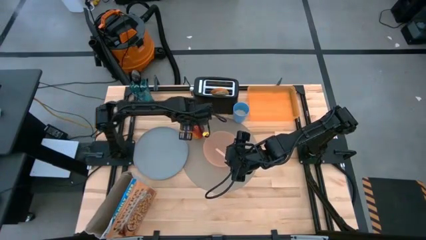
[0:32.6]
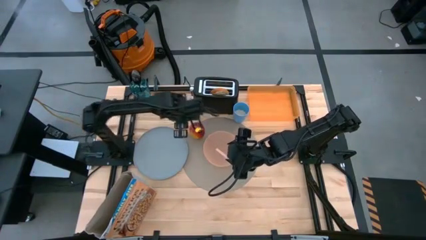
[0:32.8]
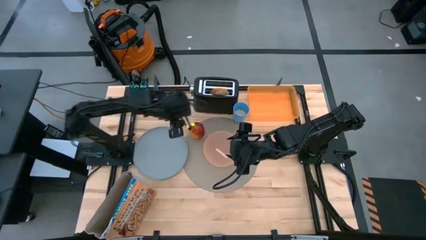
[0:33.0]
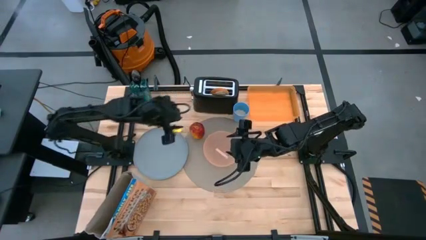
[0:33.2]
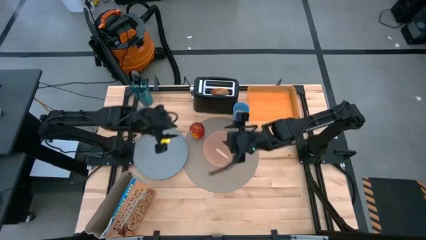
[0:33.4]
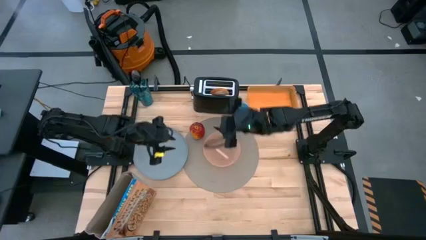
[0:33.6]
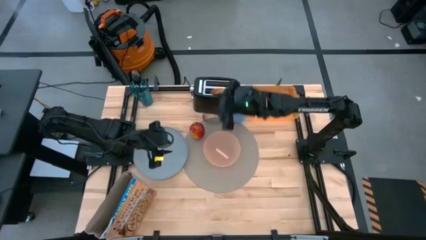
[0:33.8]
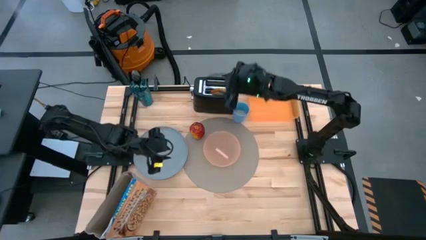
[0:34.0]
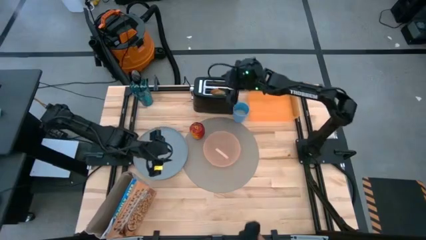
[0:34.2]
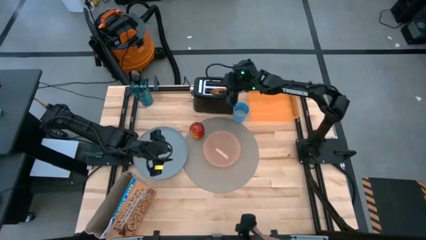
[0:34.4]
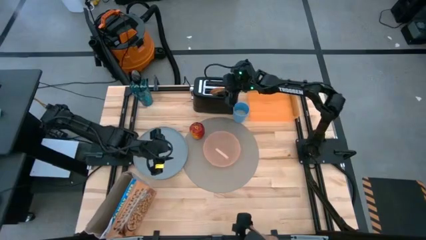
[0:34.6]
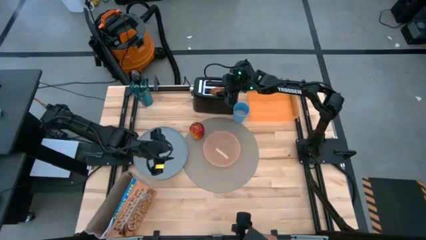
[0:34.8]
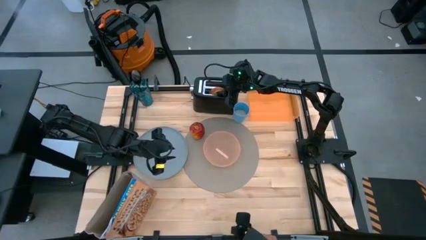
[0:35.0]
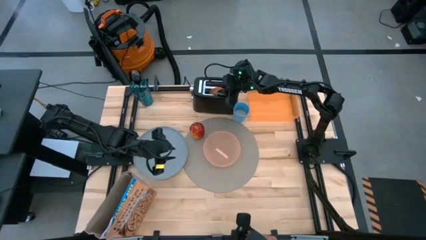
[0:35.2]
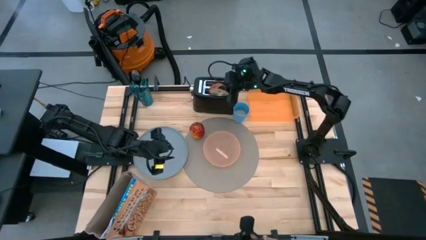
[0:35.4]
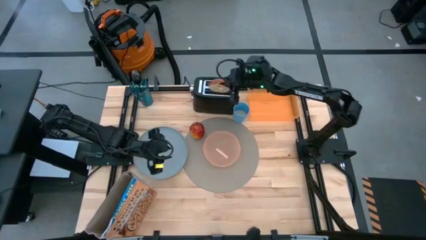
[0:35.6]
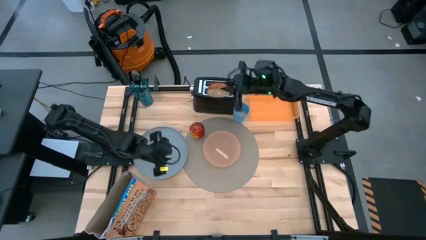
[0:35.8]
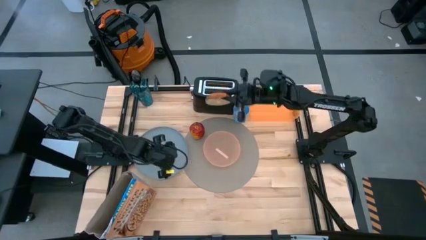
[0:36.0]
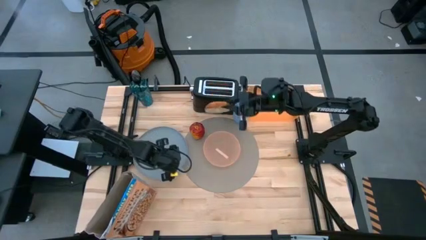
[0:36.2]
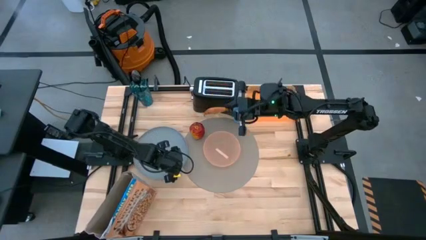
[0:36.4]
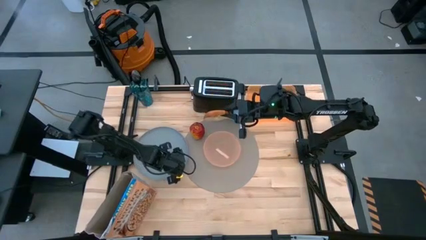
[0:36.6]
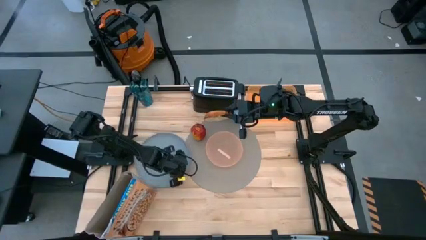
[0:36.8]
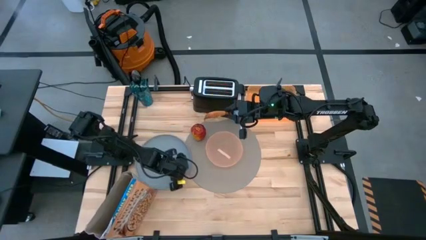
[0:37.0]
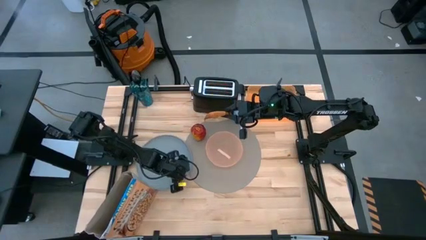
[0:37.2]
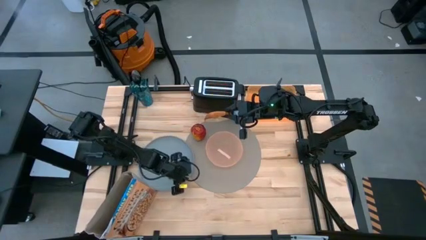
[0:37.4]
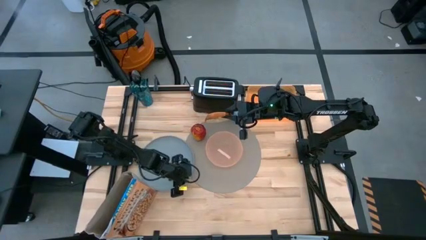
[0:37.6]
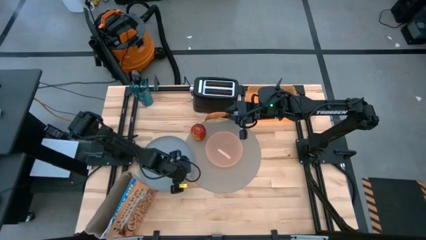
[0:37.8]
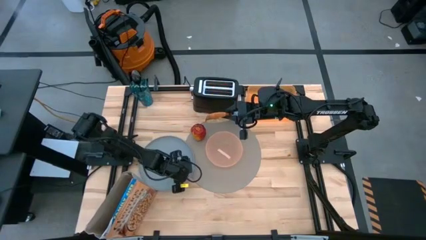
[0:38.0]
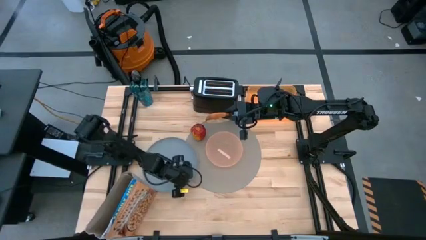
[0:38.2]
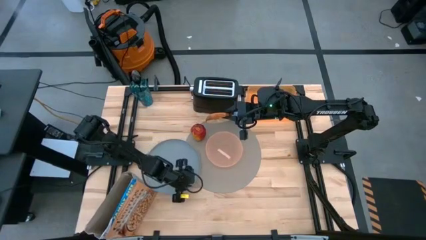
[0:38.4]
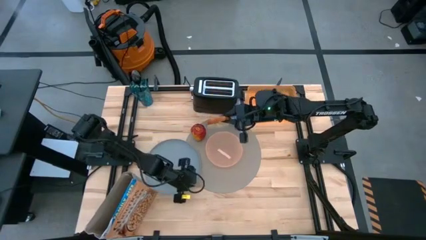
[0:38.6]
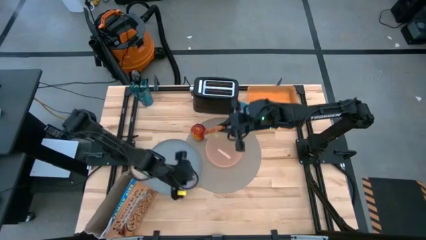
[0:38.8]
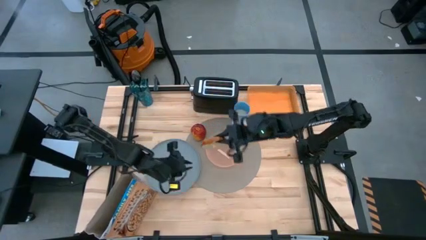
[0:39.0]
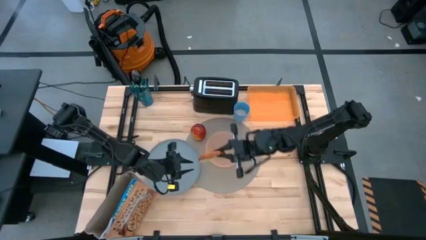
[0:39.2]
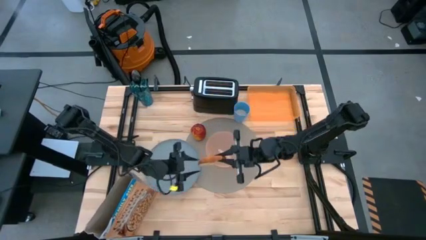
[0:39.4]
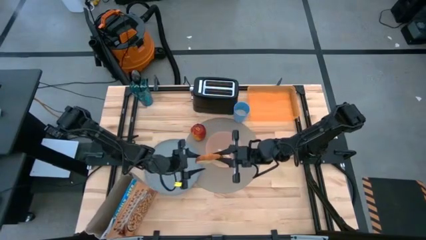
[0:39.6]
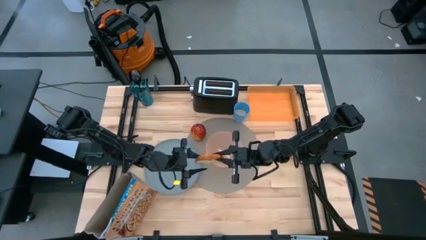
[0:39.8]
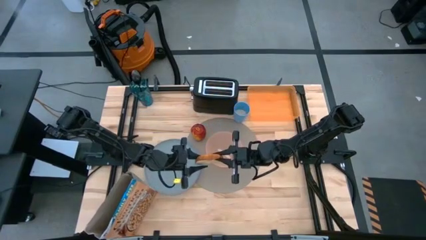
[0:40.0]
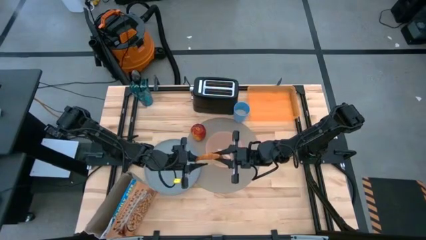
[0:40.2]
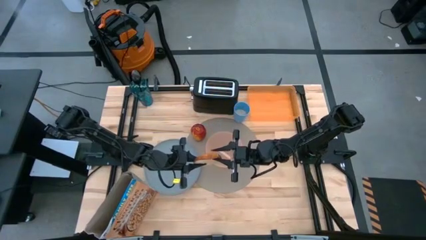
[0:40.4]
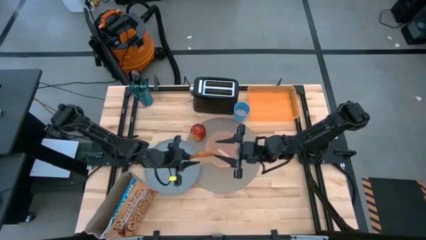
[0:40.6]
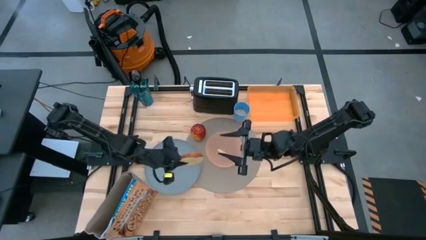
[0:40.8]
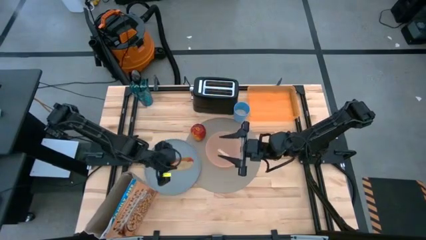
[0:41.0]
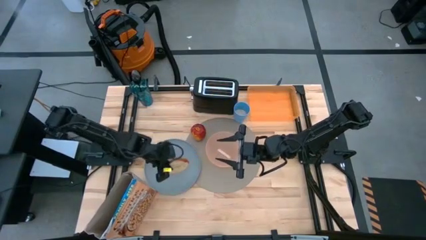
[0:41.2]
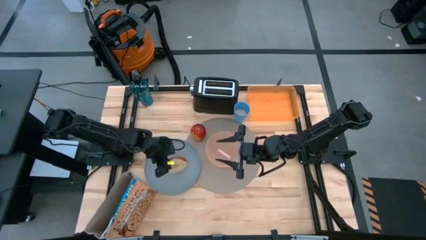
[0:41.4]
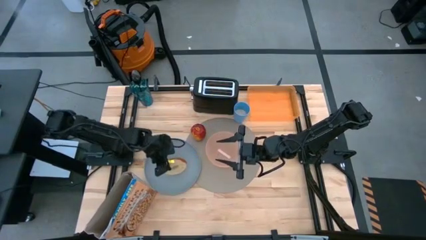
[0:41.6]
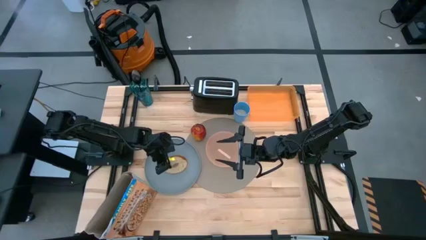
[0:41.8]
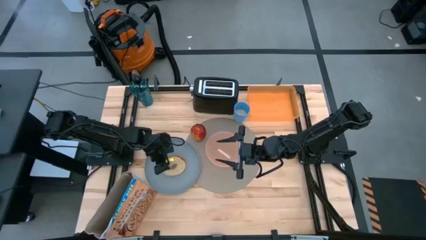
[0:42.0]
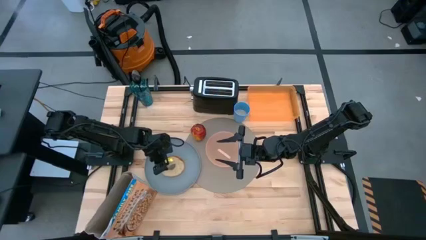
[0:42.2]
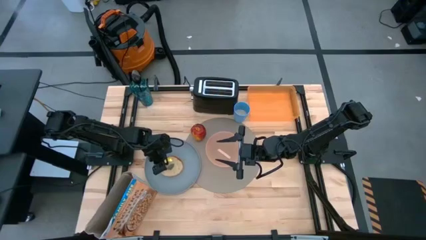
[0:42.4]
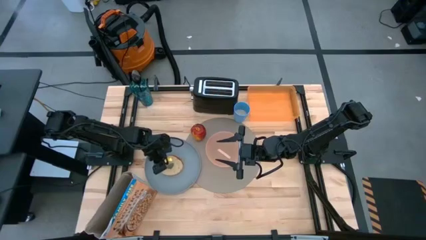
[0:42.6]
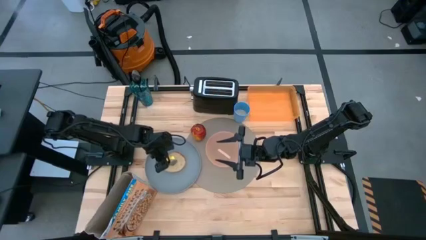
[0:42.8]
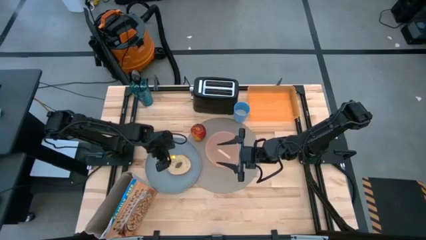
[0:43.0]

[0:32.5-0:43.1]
Task: Arrange a breakfast setting
Put the bagel from the toaster into the blue plate
